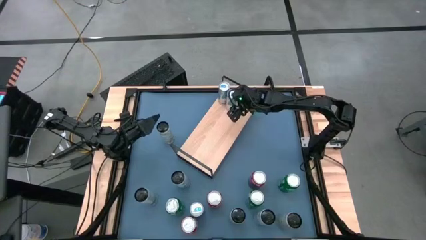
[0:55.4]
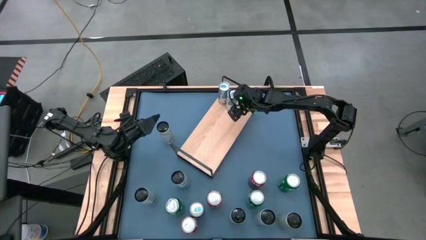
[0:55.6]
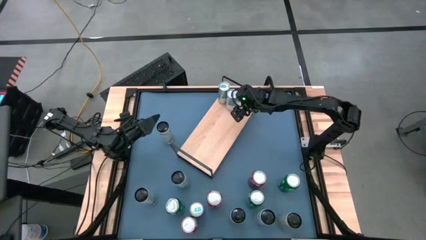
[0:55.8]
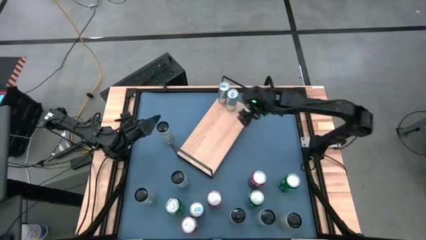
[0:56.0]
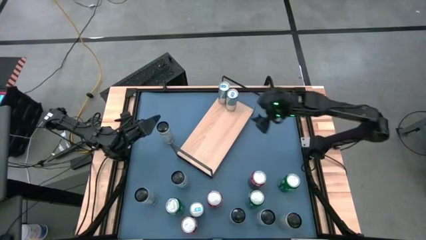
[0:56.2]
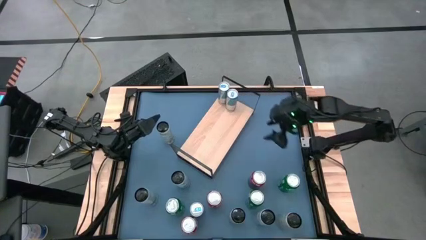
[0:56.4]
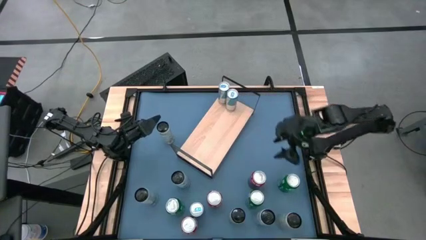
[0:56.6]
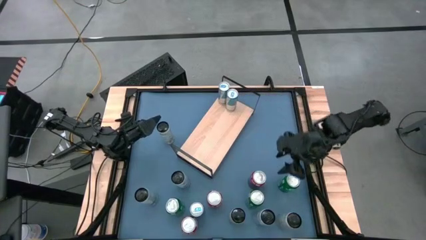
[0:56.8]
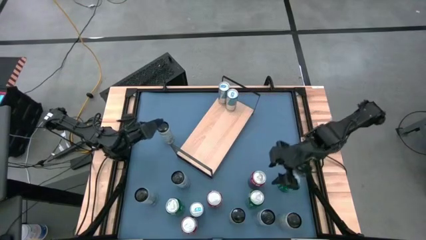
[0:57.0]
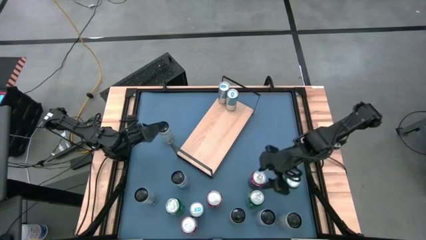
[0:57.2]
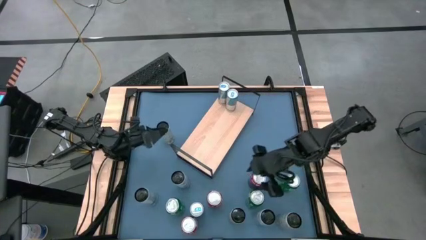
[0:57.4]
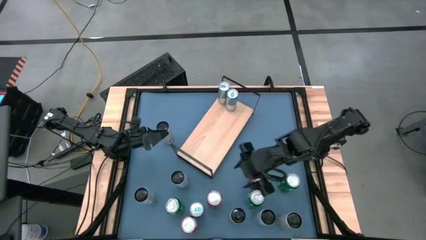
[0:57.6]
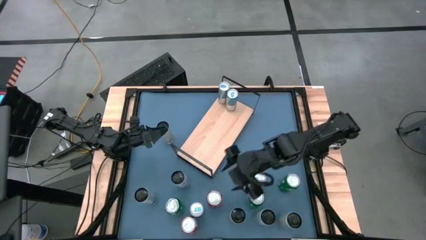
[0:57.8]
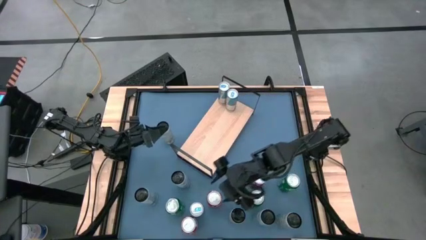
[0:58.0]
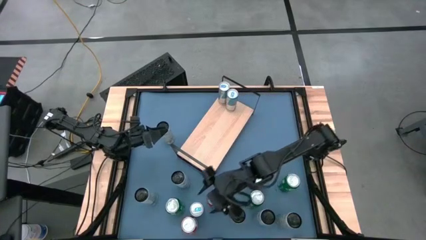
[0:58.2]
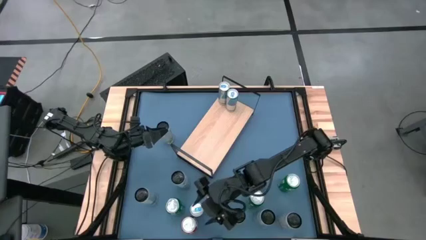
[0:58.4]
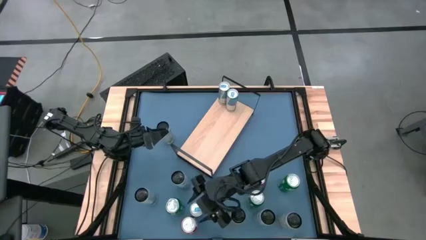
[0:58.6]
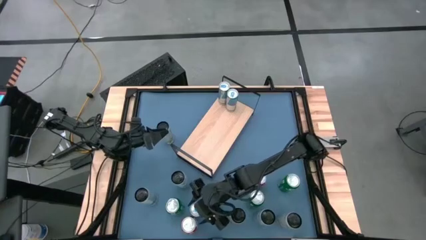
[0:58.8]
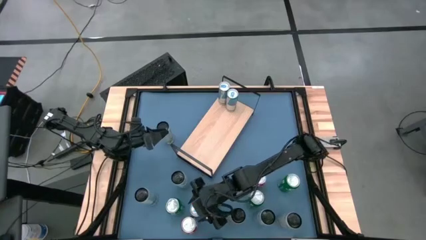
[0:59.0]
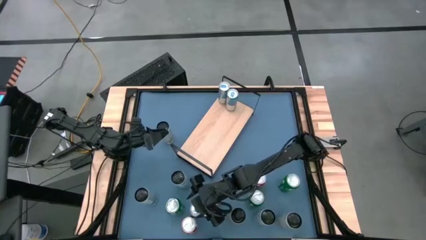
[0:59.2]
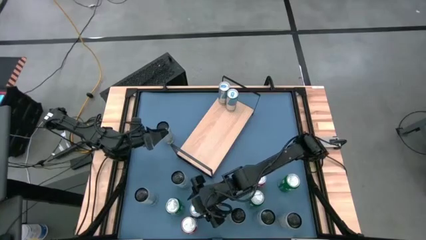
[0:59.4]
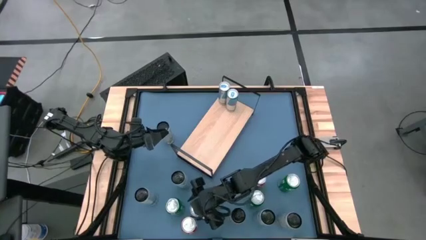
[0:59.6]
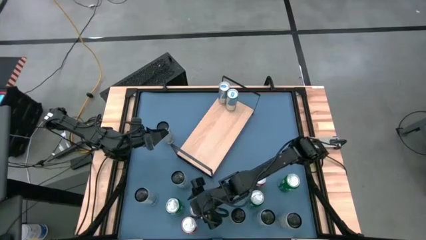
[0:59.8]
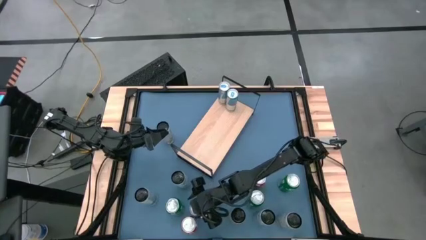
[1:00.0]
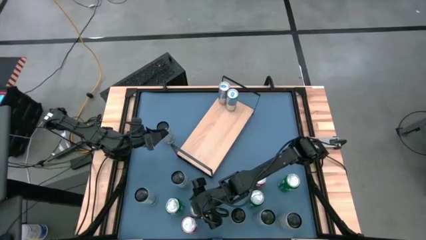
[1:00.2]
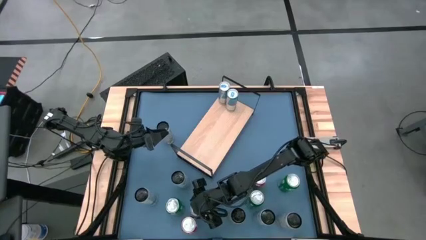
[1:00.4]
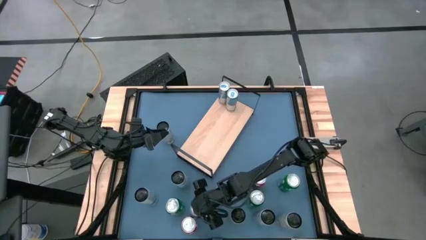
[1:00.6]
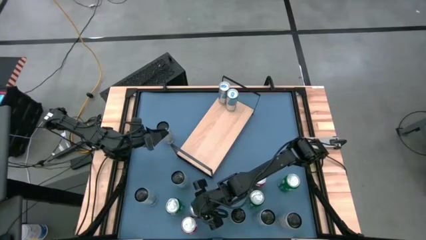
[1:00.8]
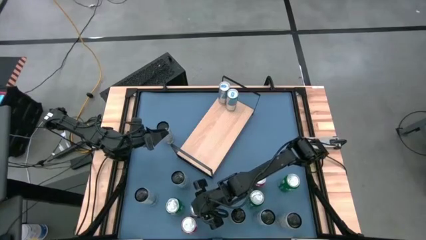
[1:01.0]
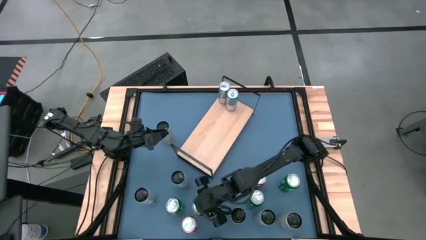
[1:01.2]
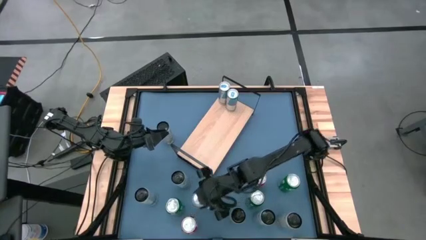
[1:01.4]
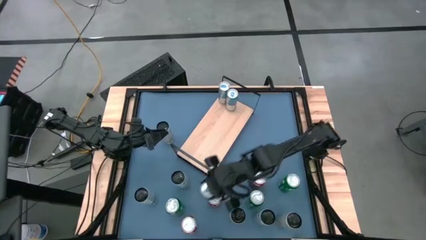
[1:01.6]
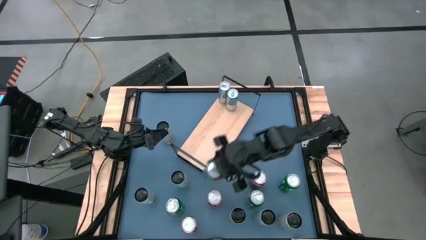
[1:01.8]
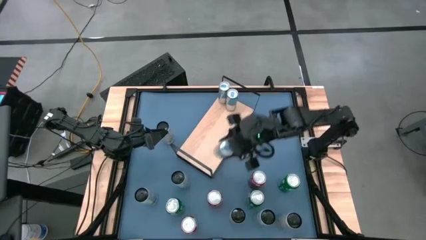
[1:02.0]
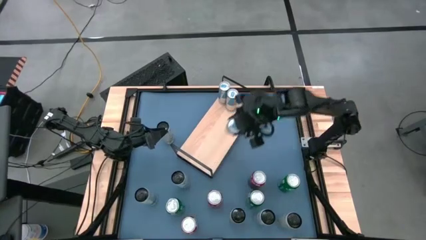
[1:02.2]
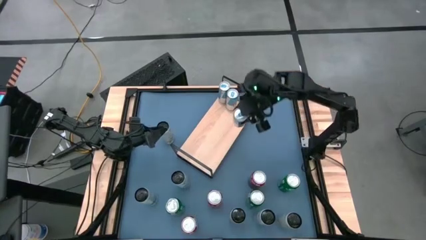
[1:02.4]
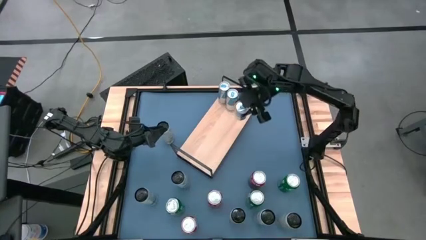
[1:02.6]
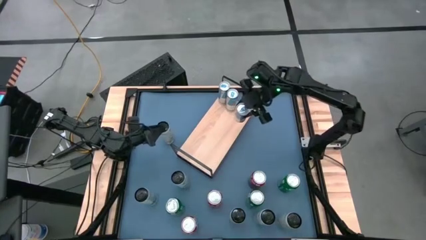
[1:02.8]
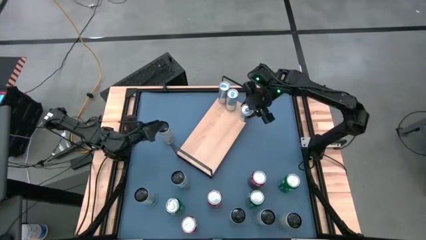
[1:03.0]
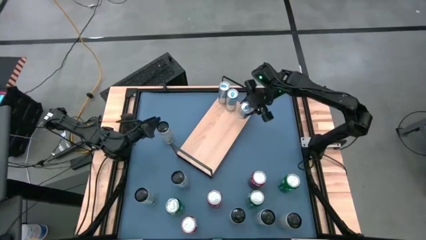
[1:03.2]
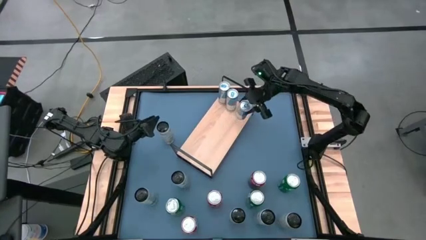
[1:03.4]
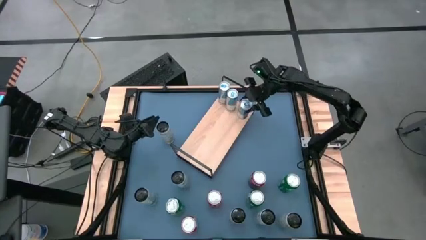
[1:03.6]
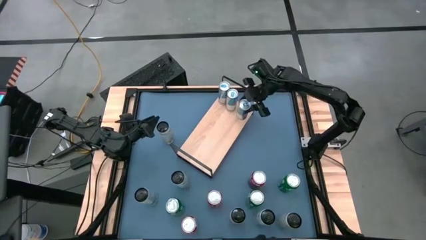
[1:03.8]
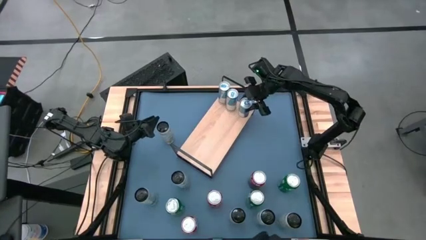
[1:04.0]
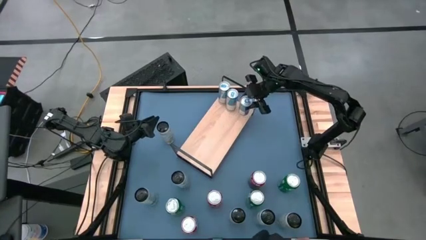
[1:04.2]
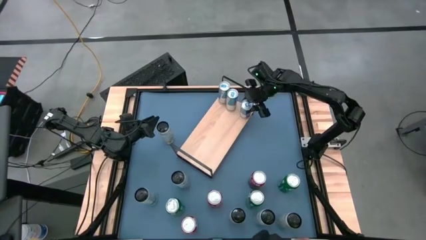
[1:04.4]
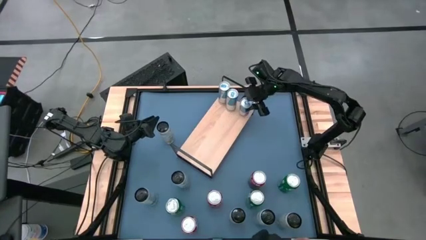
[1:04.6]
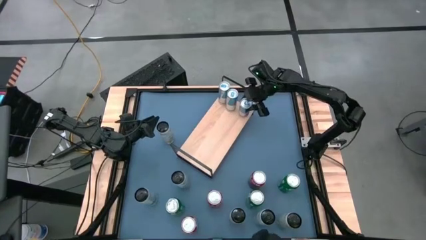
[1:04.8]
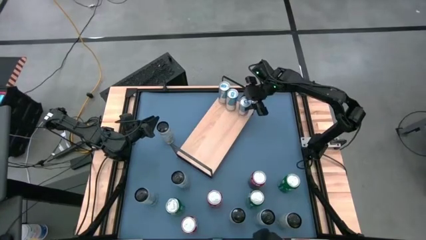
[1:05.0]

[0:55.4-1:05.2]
Task: Place canned beverage on shelf
Put blue soda can on the shelf aligned with the other blue soda cans

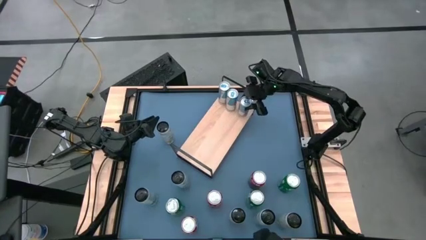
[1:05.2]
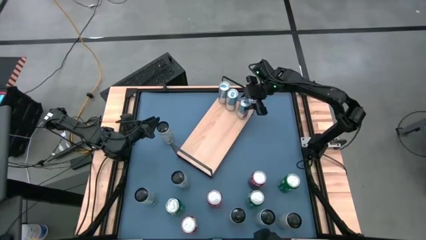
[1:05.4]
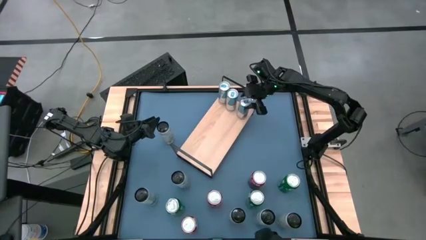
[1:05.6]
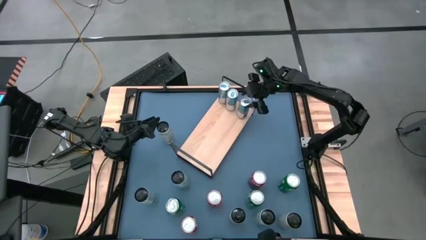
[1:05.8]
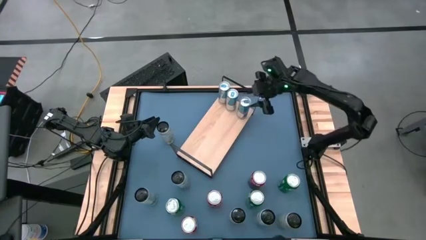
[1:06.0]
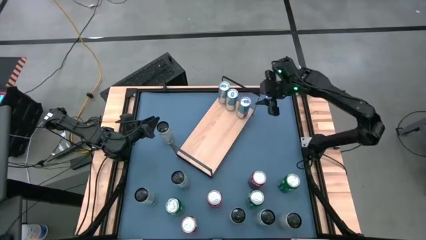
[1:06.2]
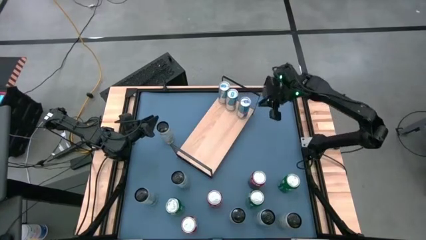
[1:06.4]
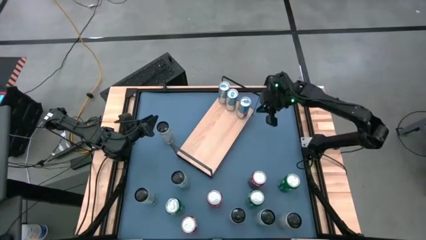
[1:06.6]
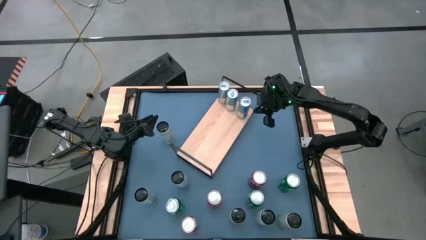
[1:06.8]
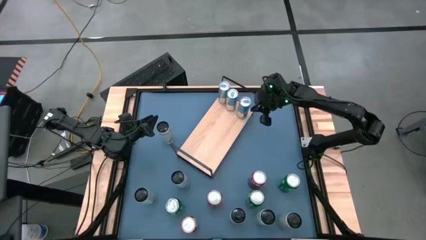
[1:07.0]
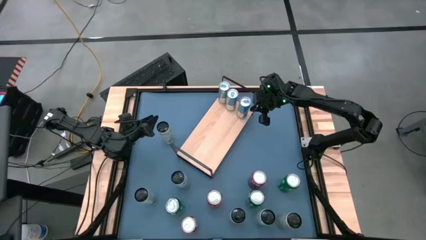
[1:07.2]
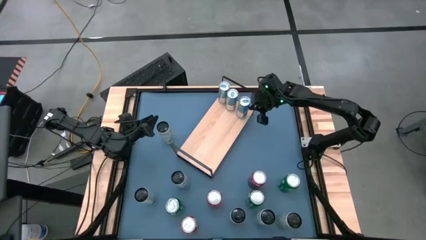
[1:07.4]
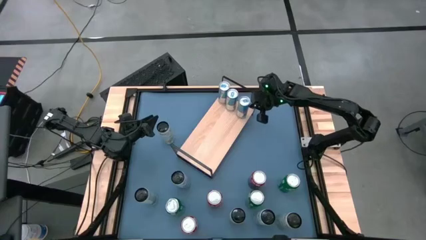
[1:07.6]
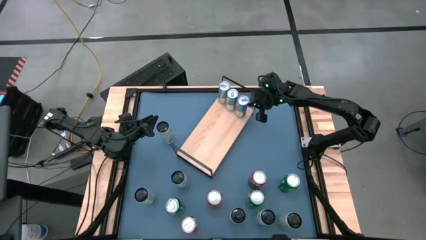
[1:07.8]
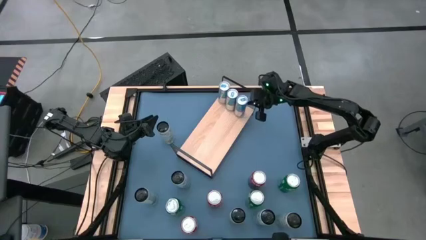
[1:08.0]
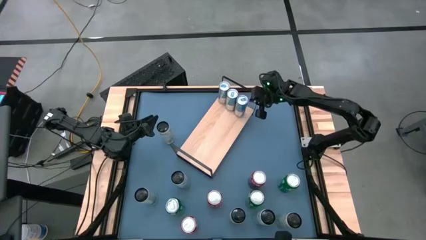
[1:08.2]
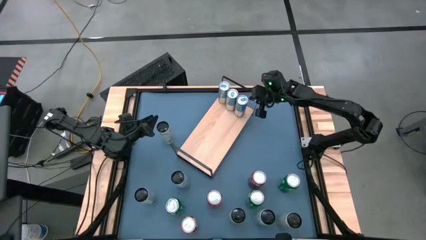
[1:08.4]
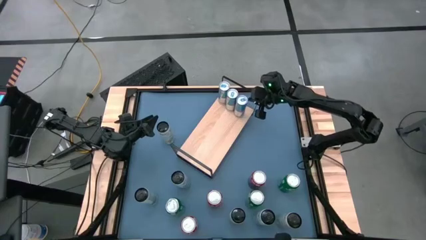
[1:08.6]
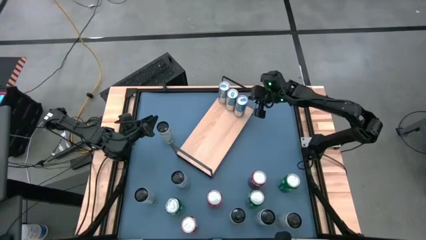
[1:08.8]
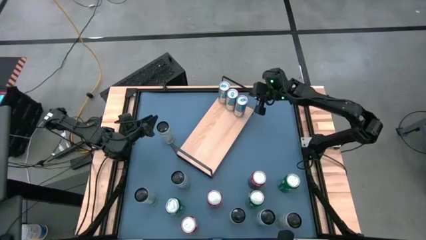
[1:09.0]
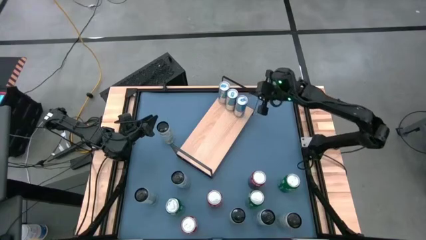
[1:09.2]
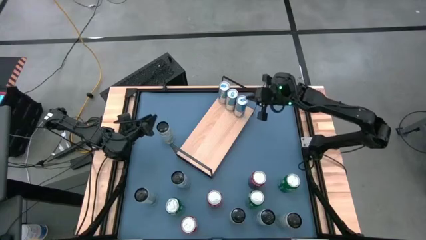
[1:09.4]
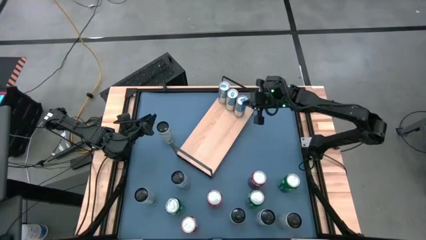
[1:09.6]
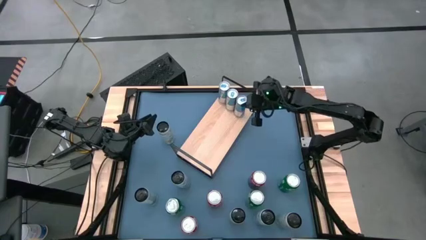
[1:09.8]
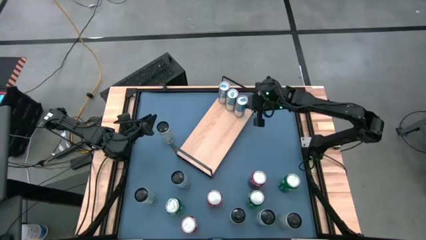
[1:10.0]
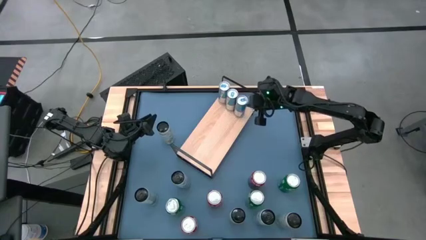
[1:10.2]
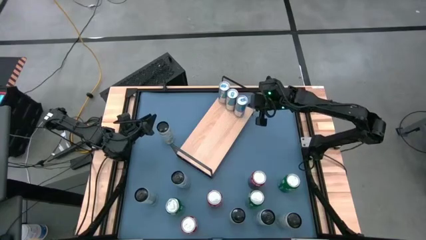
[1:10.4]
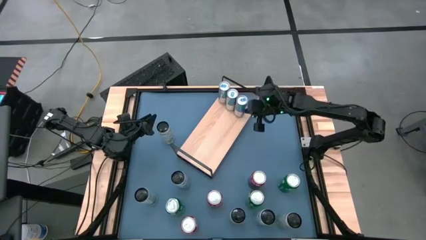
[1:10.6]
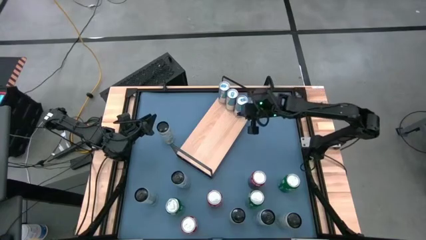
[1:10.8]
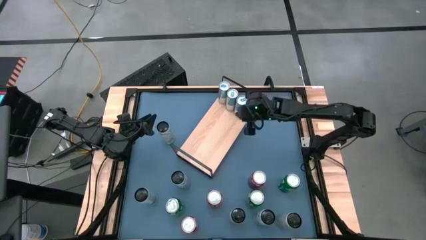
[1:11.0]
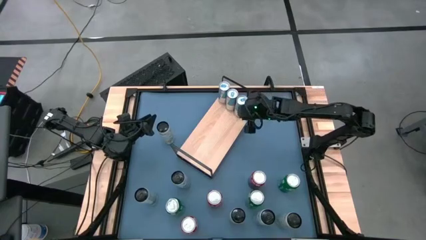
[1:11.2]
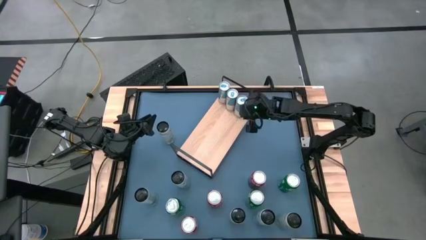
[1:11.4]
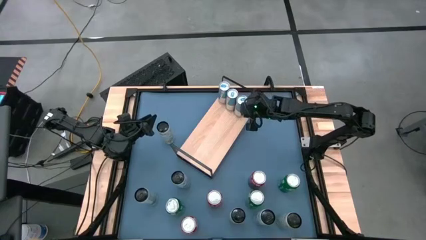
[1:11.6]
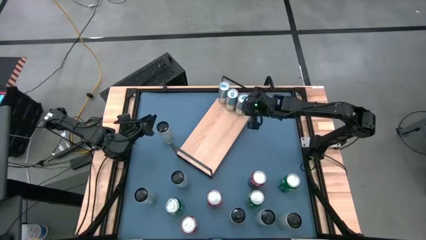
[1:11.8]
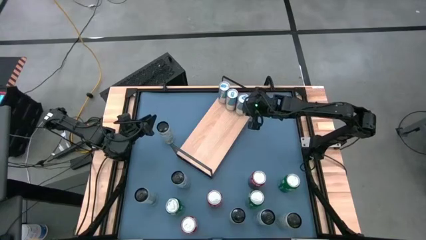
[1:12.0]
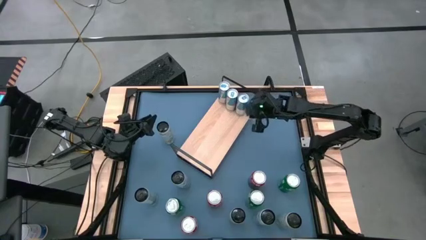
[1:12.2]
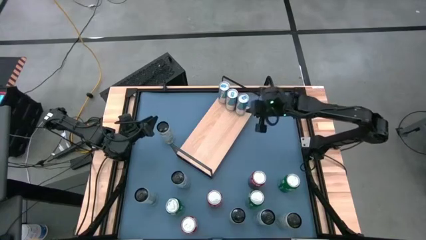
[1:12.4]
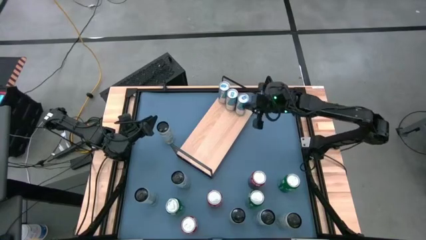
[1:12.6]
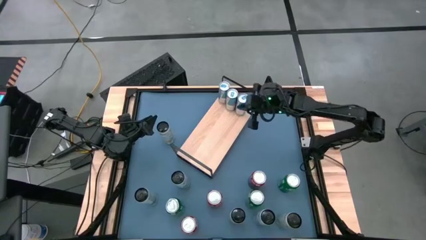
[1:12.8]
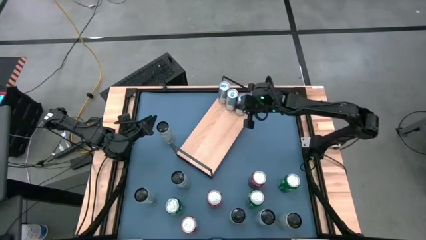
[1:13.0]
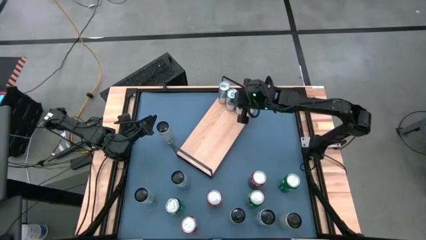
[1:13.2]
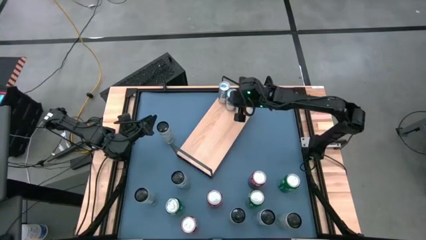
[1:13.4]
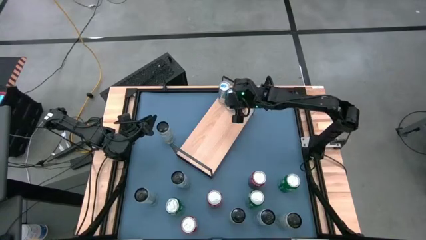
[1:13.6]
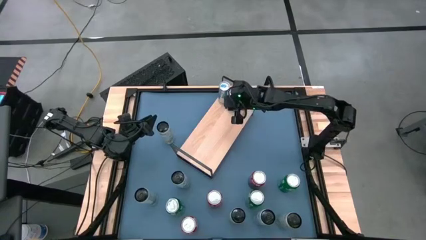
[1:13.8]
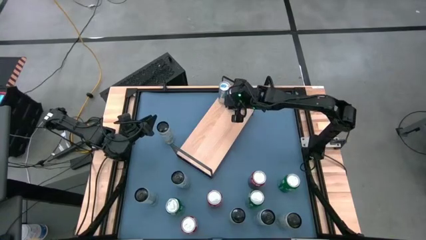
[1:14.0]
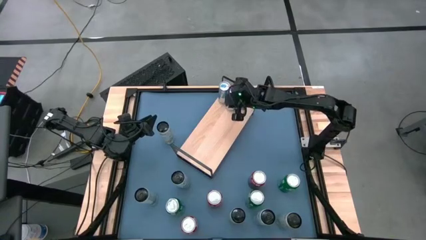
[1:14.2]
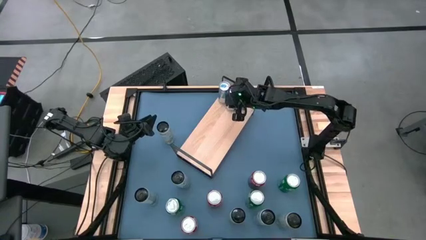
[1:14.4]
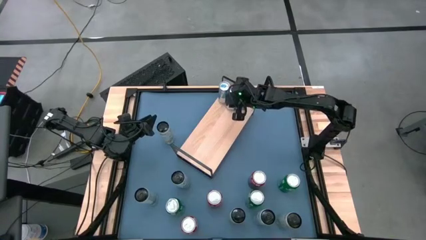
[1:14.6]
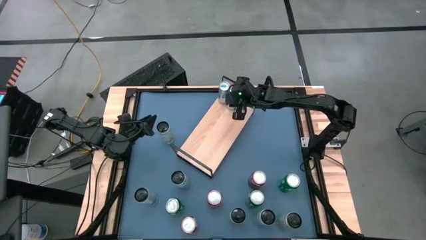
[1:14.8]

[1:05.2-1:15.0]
Put blue soda can on the shelf aligned with the other blue soda cans
